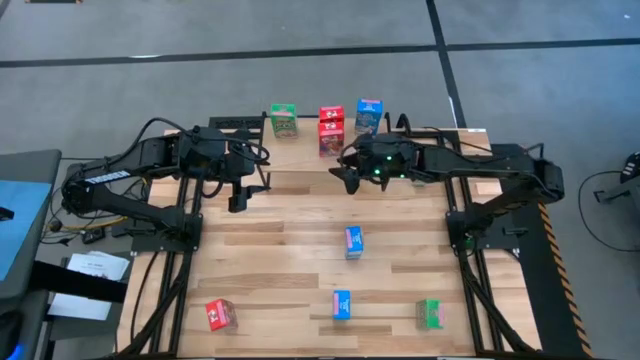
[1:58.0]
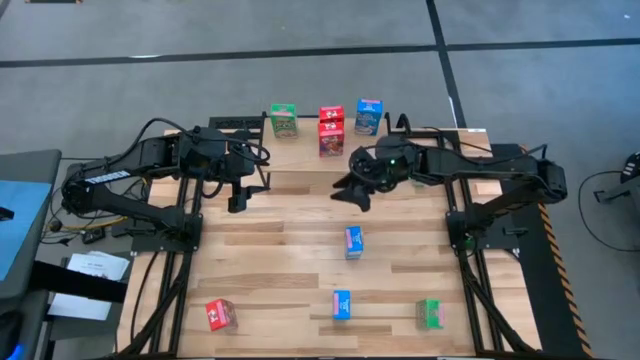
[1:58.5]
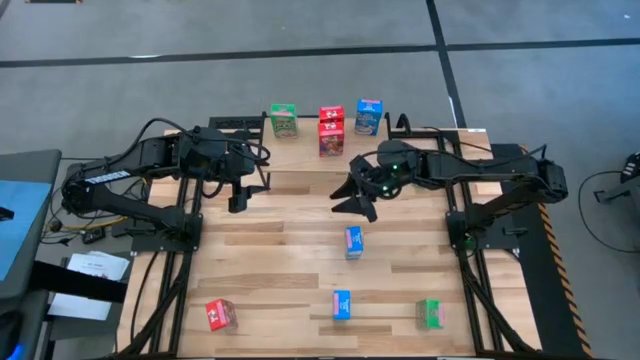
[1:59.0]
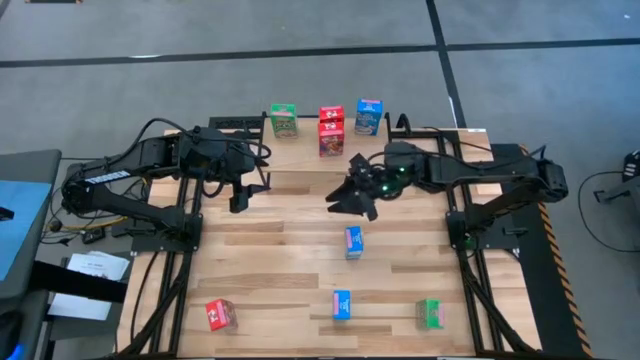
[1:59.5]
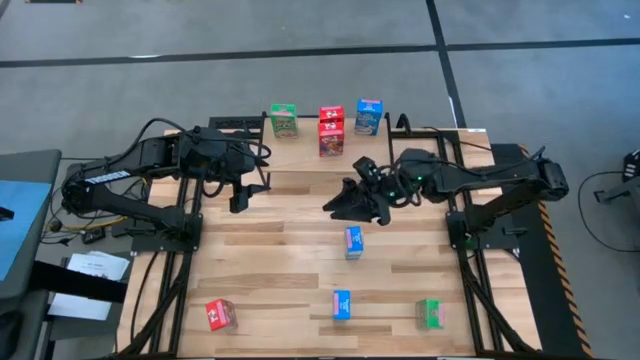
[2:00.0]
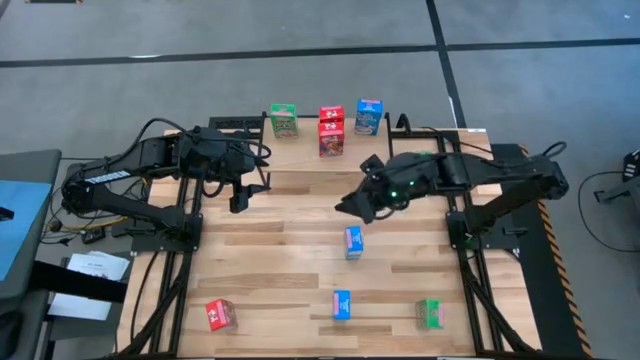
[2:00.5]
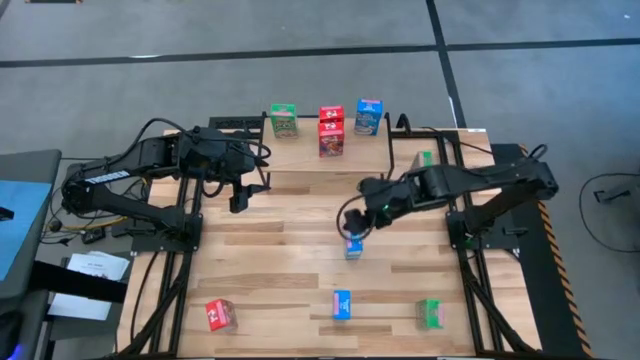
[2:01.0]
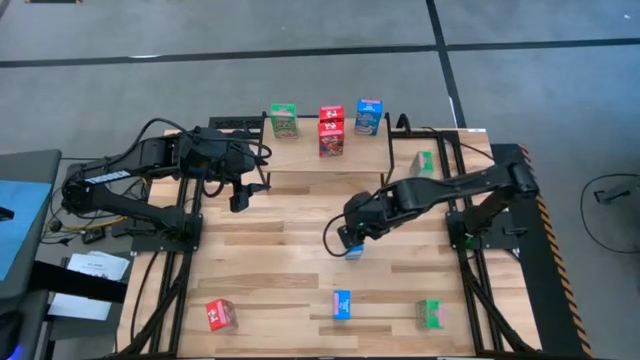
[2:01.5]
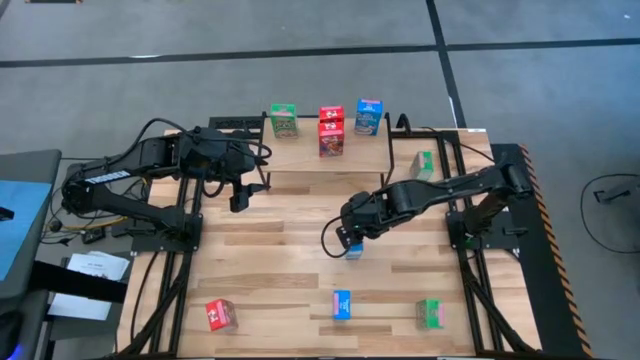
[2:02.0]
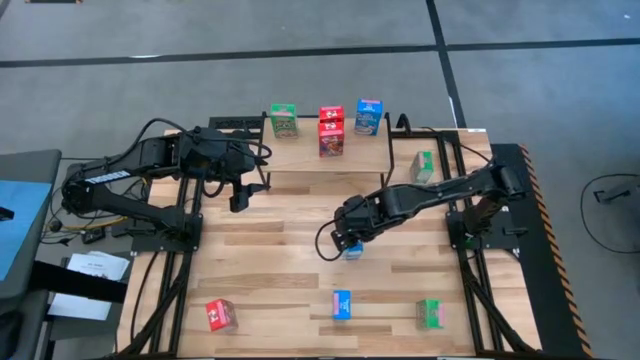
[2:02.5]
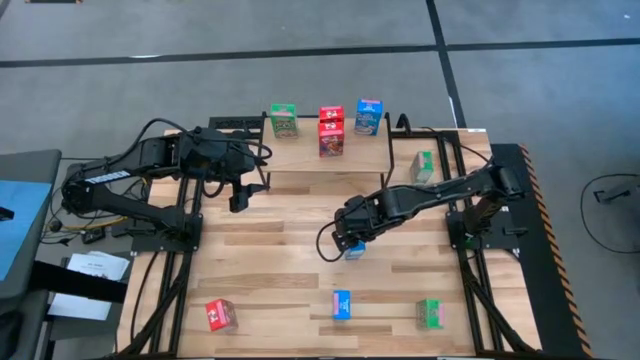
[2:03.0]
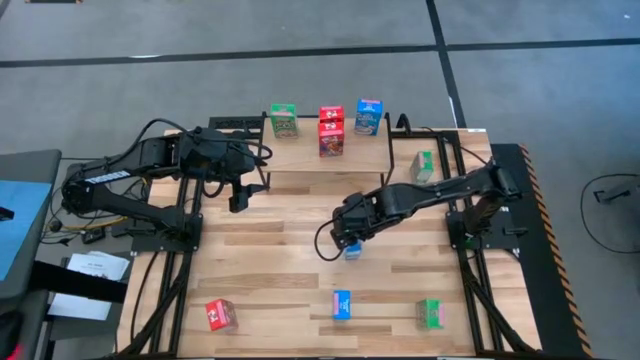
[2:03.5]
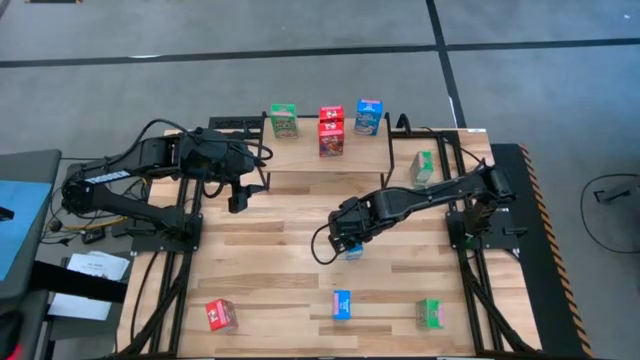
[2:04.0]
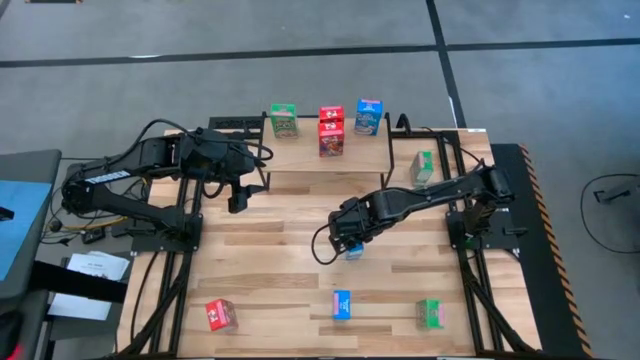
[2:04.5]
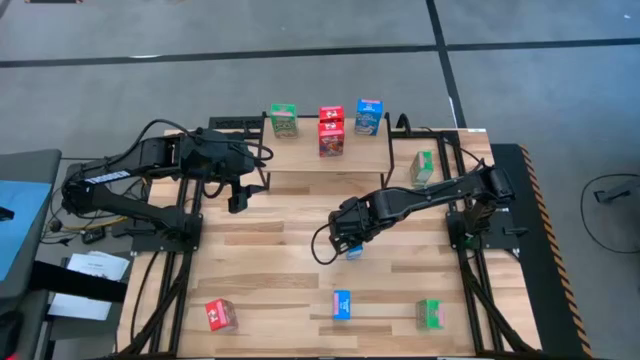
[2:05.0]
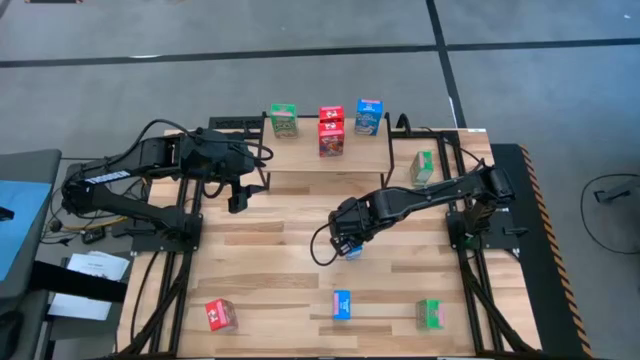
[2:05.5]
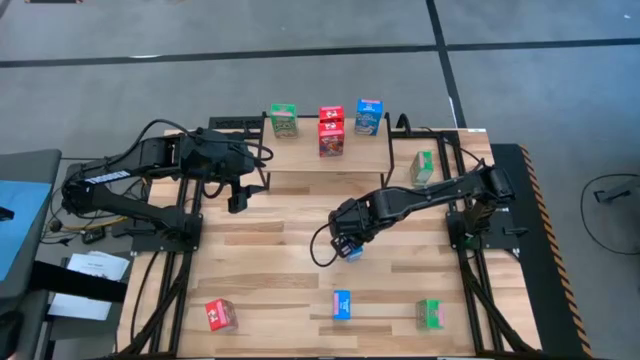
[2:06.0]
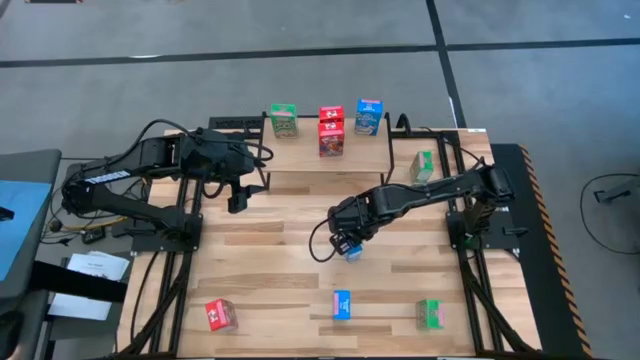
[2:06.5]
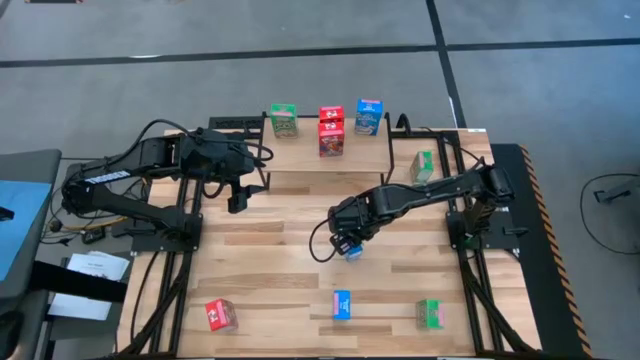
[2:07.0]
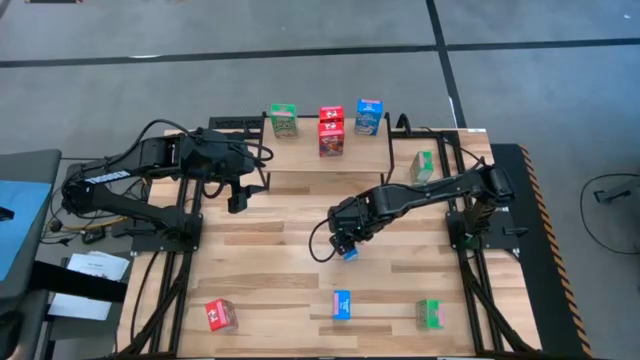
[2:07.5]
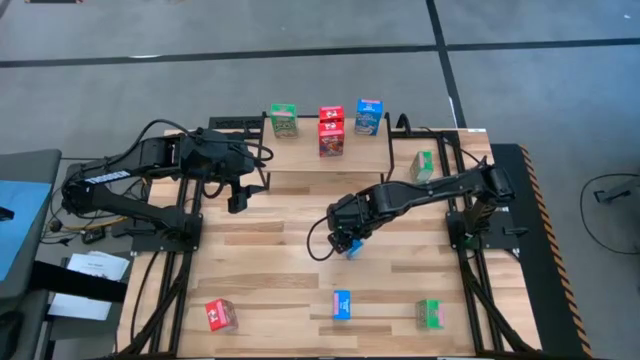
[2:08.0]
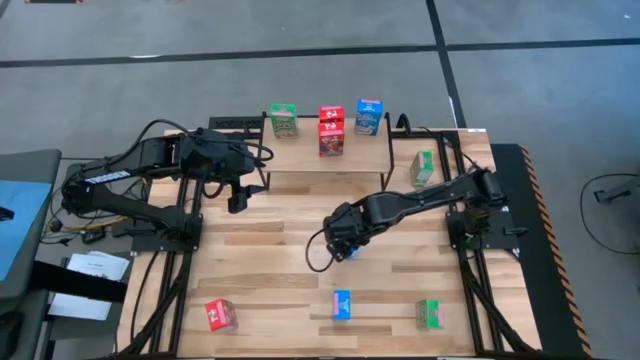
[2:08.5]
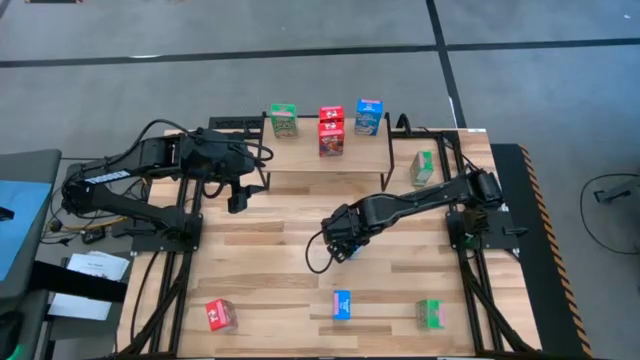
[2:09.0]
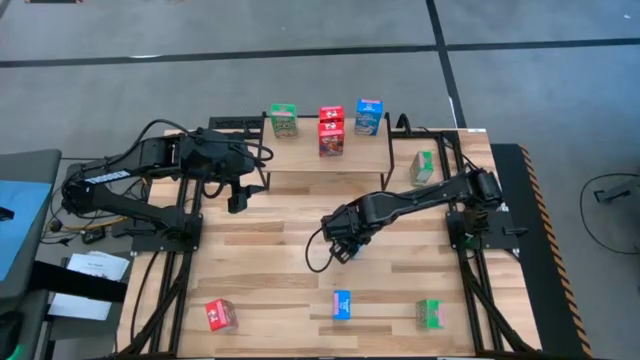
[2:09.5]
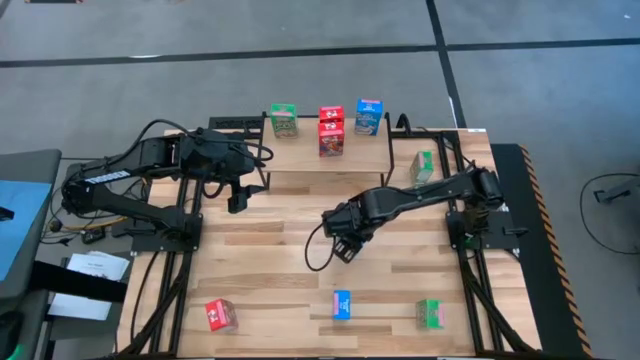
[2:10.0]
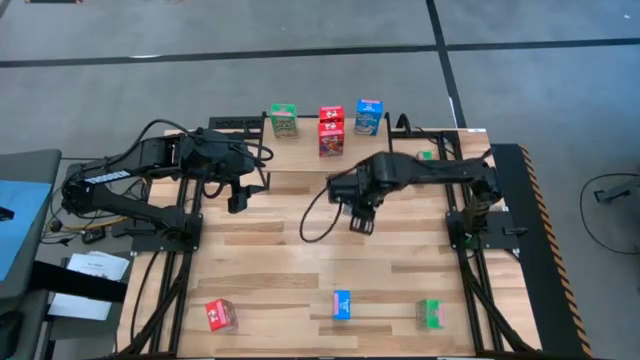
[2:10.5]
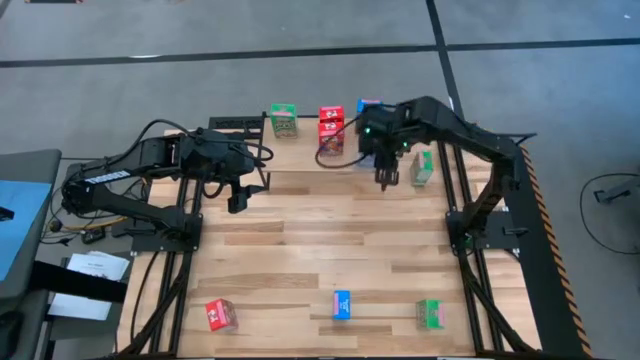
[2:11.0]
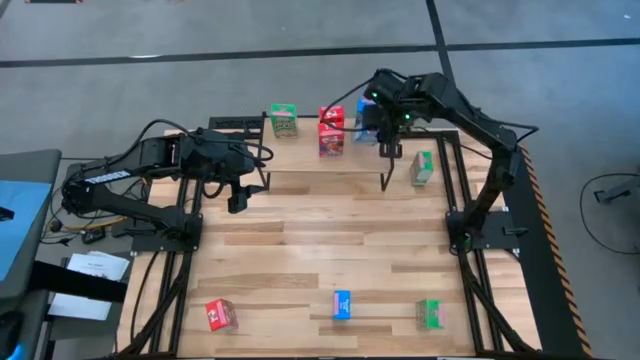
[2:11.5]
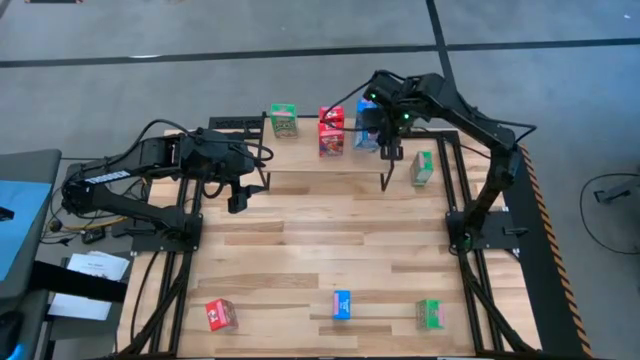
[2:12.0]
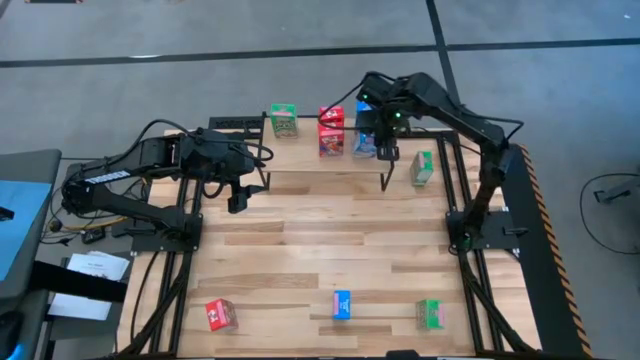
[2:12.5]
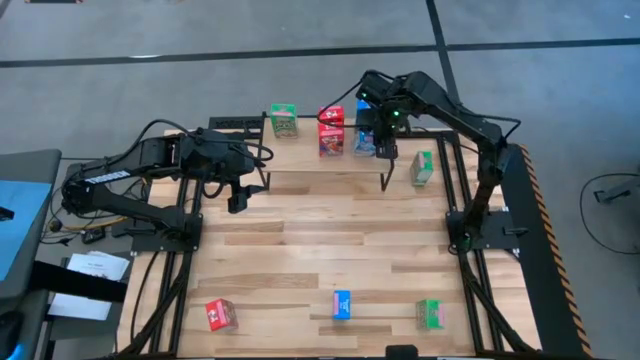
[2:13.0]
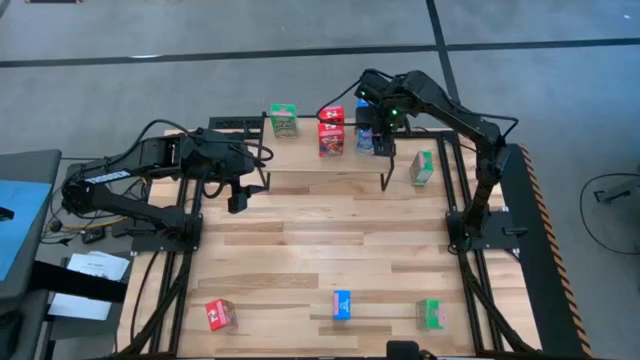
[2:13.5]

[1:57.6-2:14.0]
Task: Stack cereal on shelf
Put the top blue cereal box on the shelf aligned with the other blue cereal box
